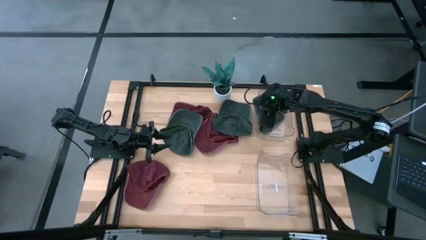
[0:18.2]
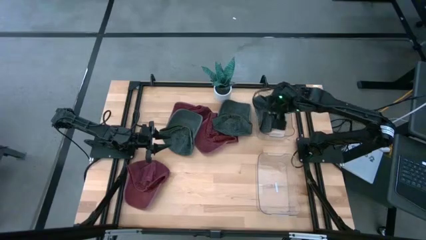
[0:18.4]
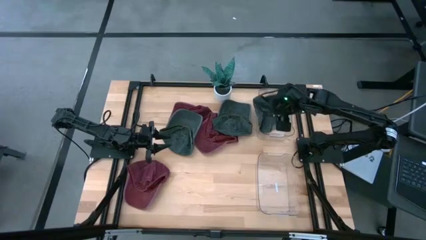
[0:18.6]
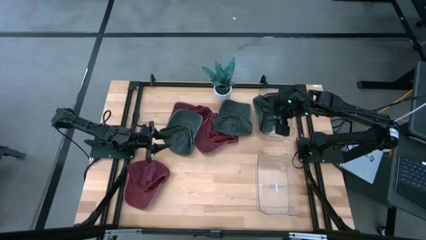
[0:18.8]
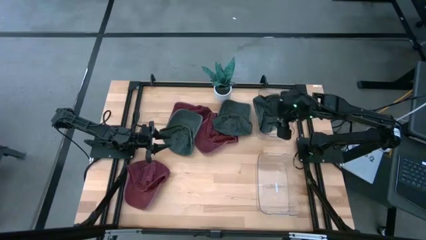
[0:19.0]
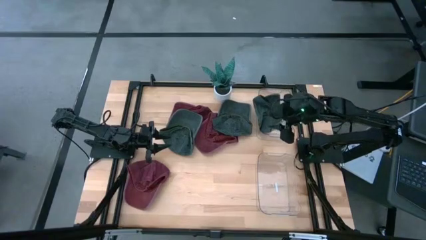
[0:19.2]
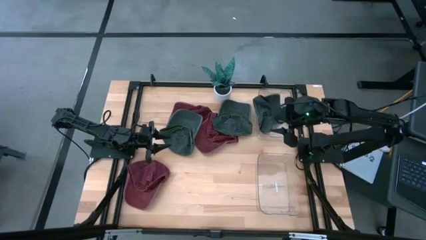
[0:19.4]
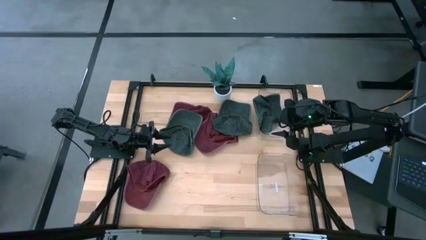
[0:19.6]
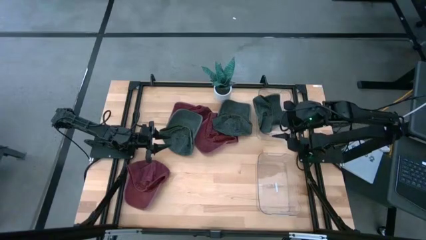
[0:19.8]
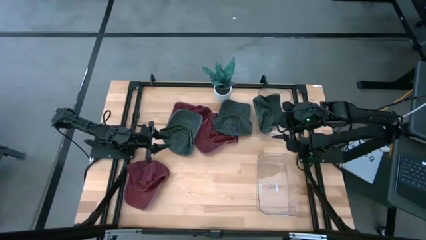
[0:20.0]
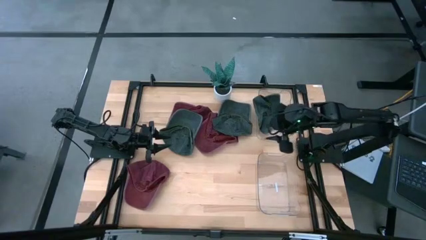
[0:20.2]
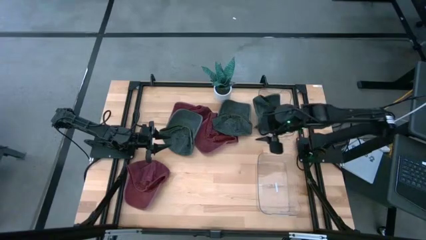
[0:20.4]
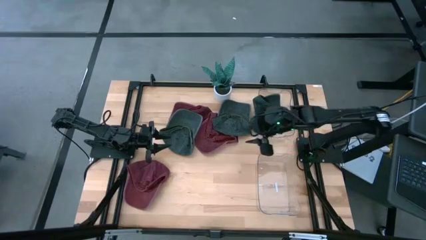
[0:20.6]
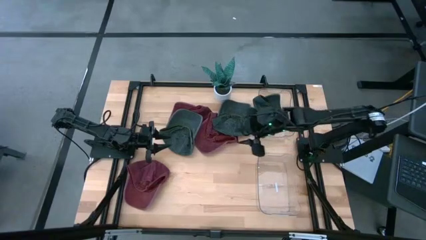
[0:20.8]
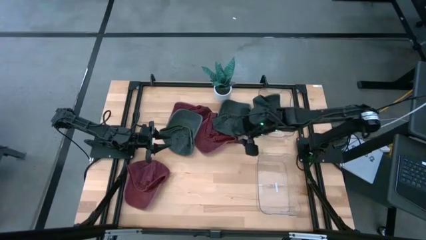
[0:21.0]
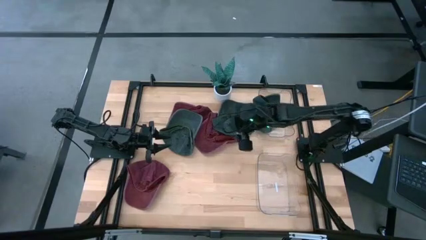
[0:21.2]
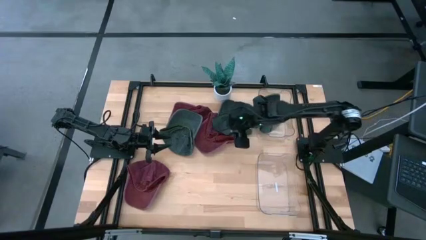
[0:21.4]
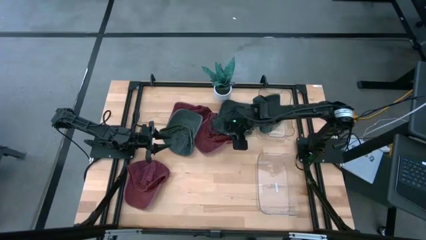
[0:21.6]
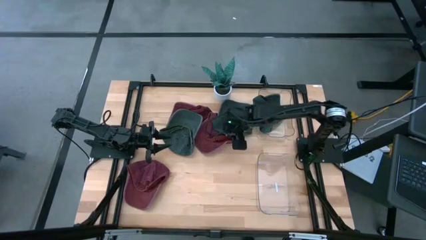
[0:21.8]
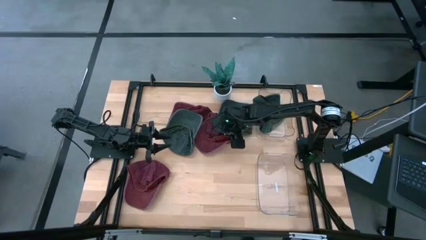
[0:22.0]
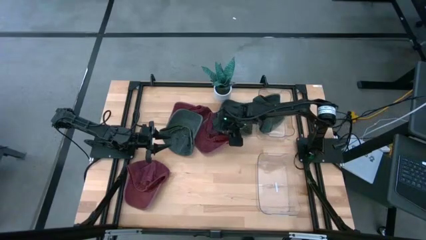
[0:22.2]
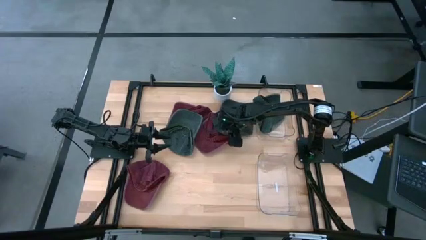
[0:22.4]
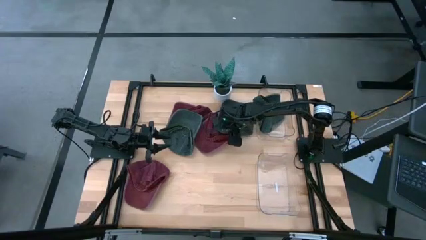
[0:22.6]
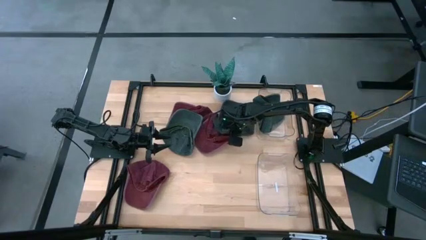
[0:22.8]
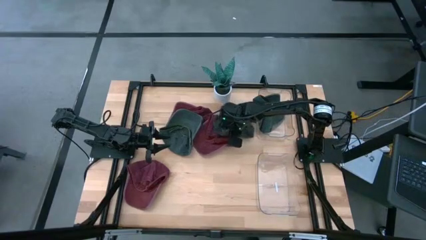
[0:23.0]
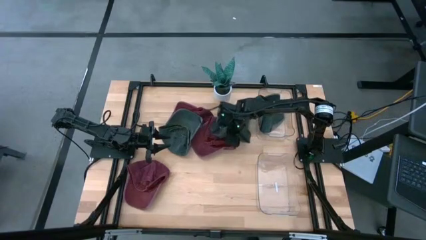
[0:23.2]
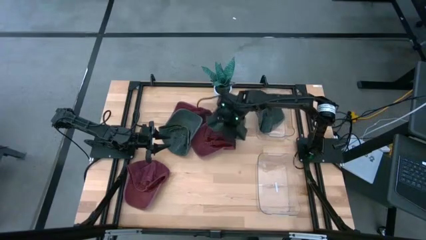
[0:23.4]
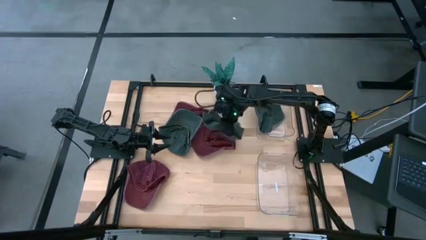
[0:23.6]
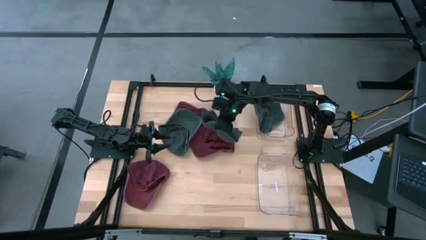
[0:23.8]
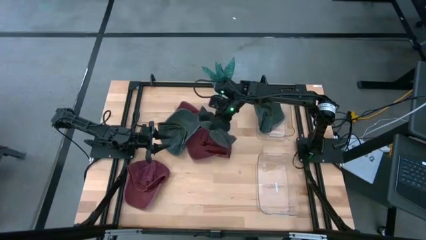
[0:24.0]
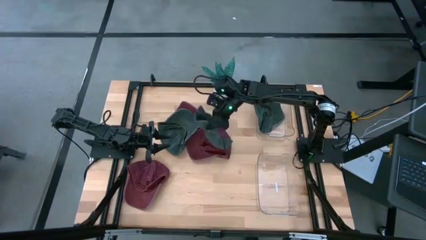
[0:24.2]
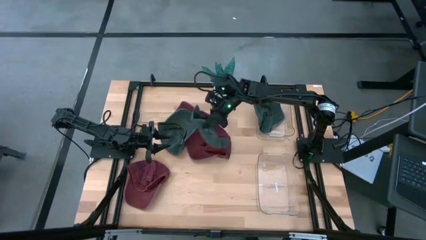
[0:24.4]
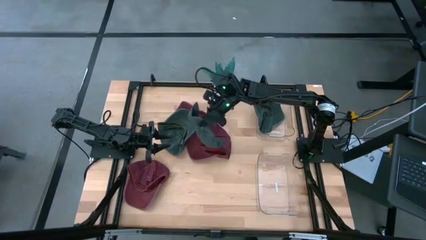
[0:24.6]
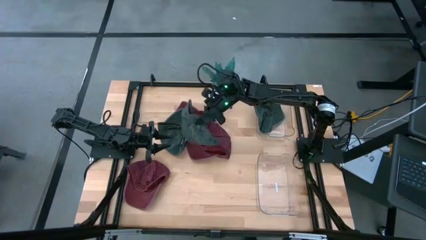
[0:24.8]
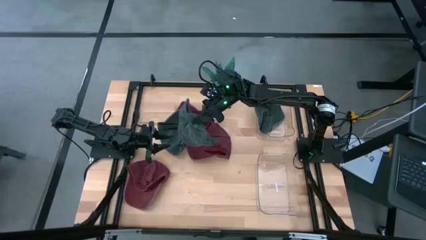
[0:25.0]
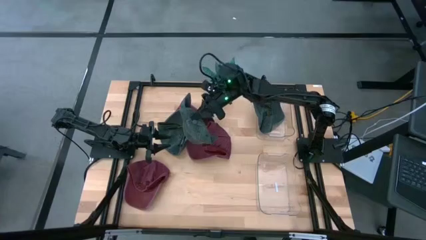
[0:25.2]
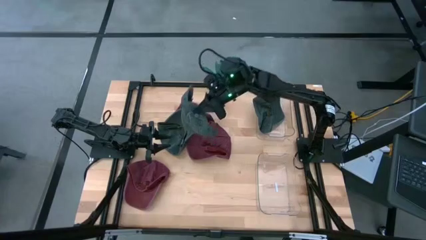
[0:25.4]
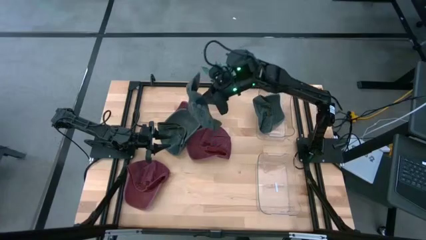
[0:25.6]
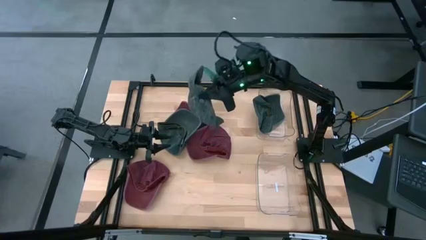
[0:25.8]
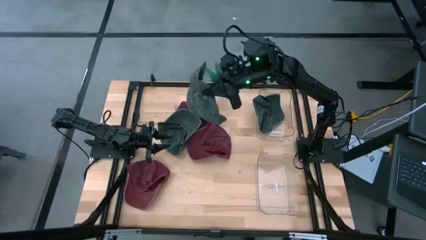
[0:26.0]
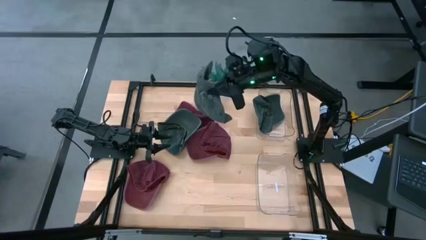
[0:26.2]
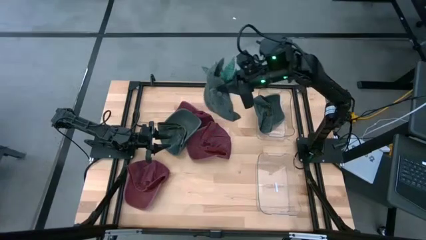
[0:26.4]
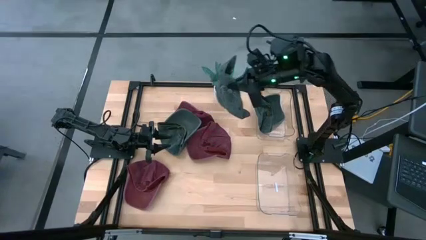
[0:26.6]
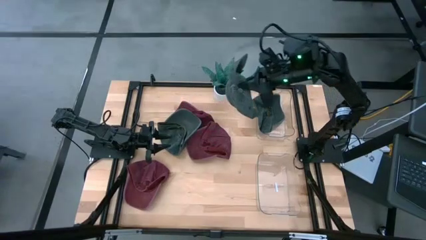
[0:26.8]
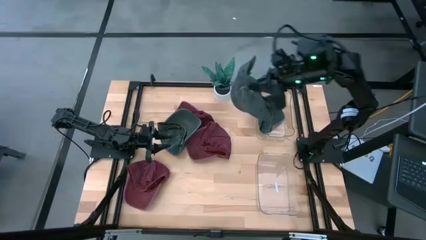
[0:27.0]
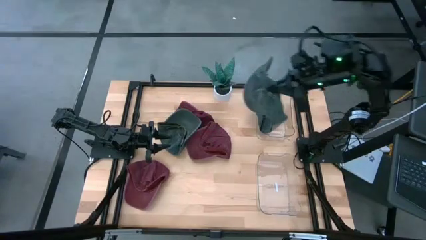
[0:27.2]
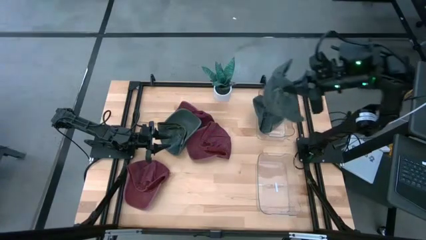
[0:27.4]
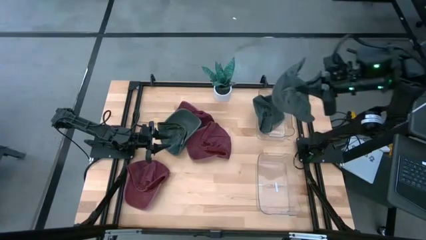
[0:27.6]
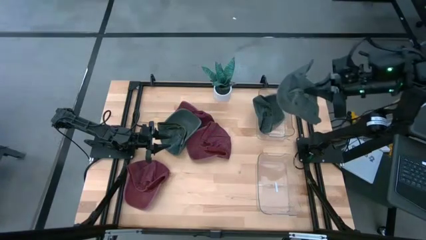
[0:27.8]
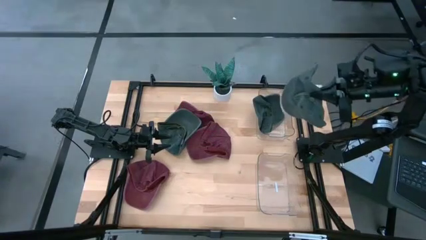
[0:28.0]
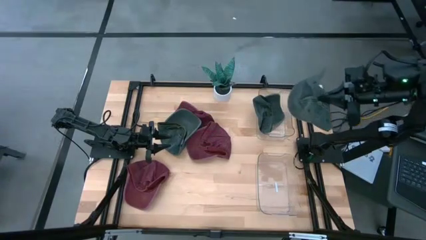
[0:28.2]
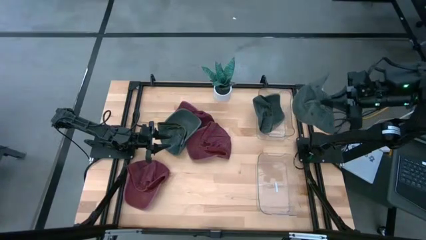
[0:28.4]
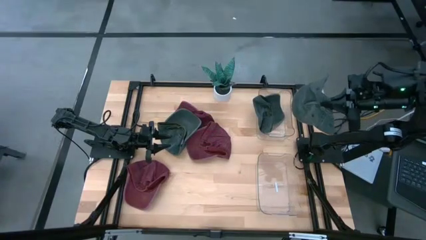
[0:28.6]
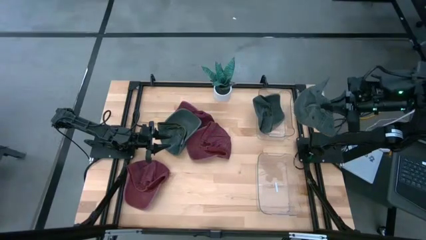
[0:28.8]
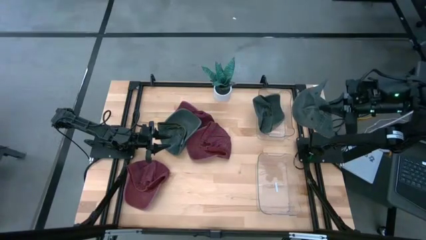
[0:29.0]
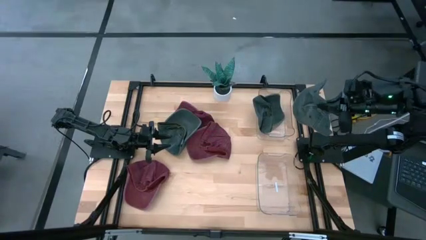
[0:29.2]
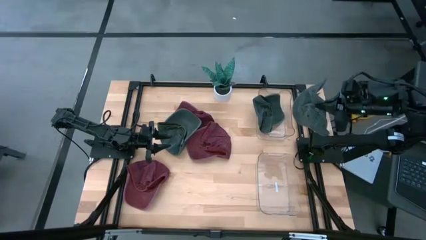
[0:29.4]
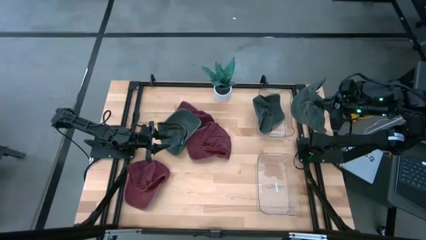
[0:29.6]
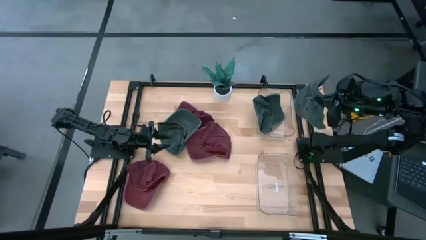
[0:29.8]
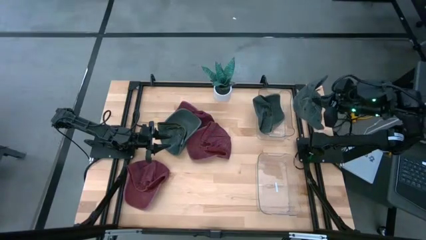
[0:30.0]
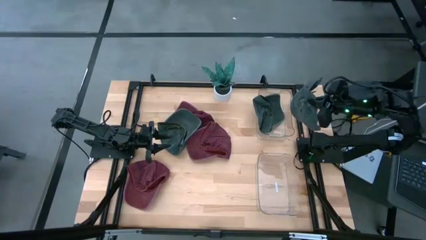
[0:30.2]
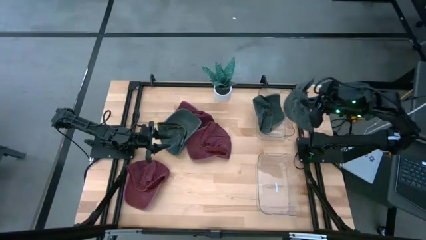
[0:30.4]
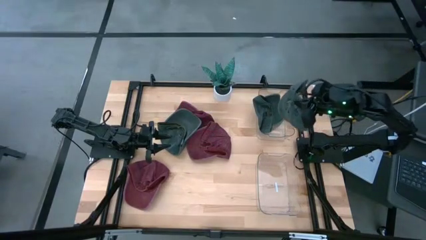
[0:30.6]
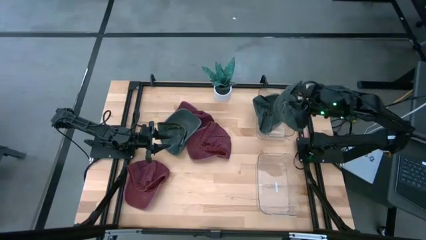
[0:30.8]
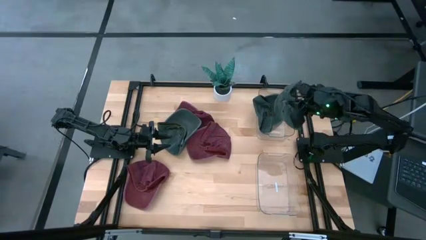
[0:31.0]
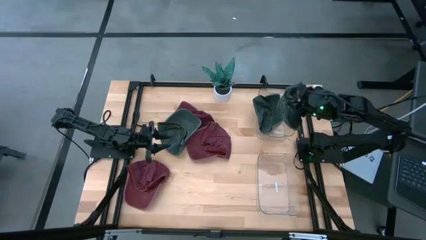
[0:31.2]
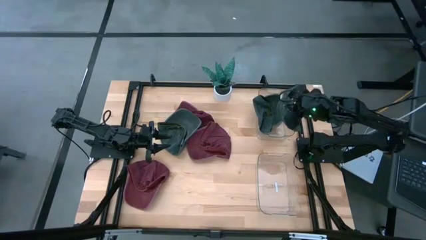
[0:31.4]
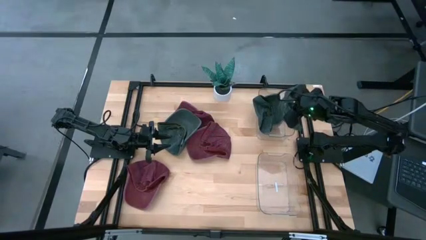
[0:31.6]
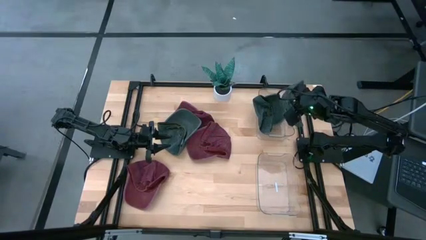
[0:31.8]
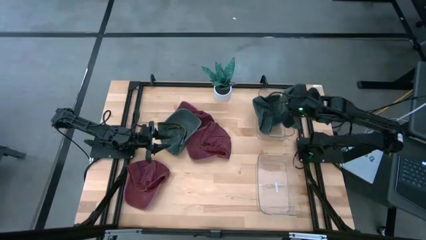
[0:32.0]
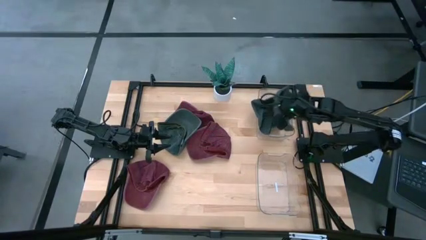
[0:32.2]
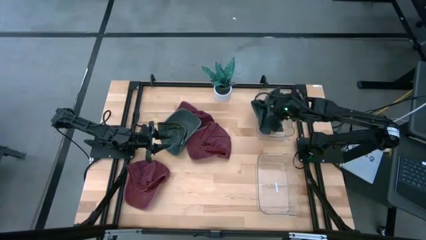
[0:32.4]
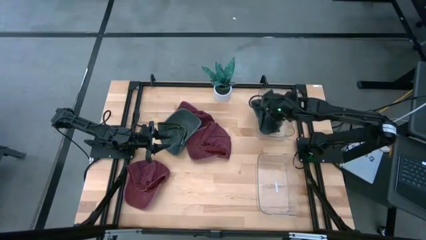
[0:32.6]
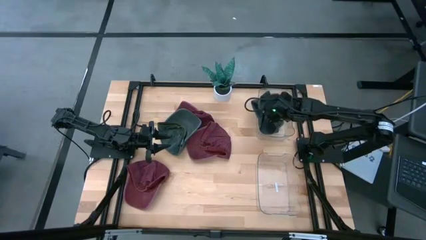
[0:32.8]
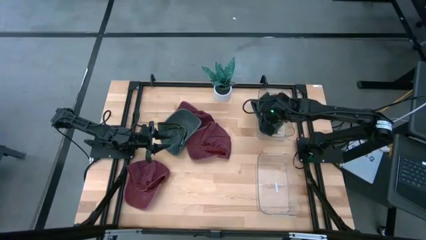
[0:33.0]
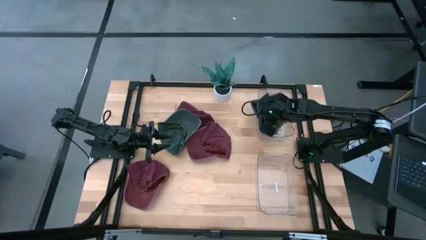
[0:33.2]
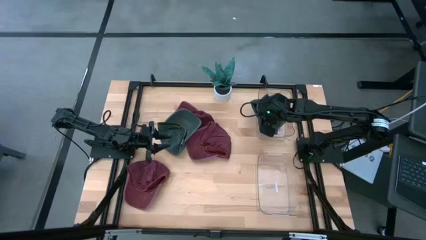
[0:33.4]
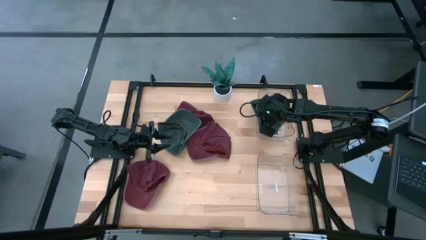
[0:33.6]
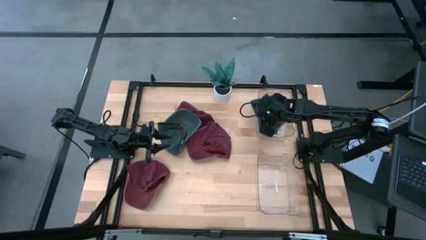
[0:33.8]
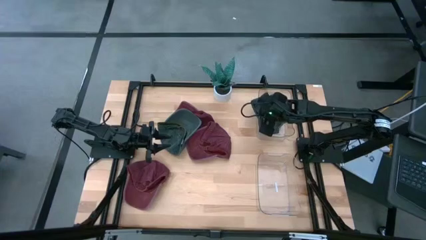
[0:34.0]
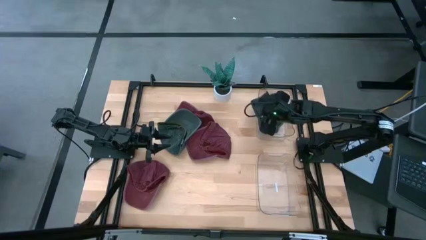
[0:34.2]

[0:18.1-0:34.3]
Task: Pick & Place hat
Put the right black cap into the top transparent bin
